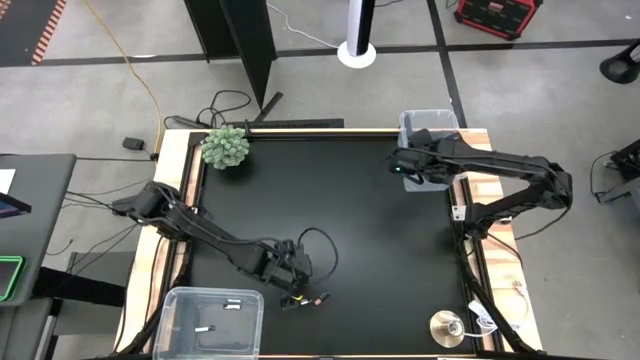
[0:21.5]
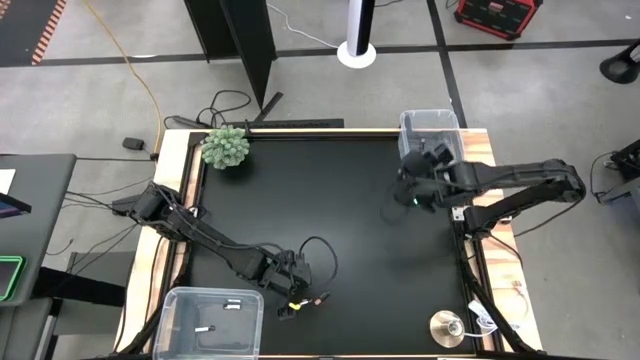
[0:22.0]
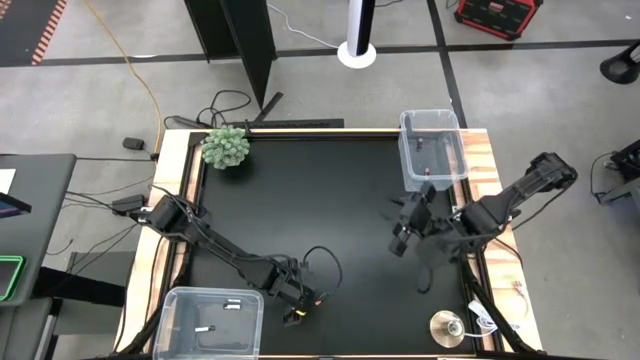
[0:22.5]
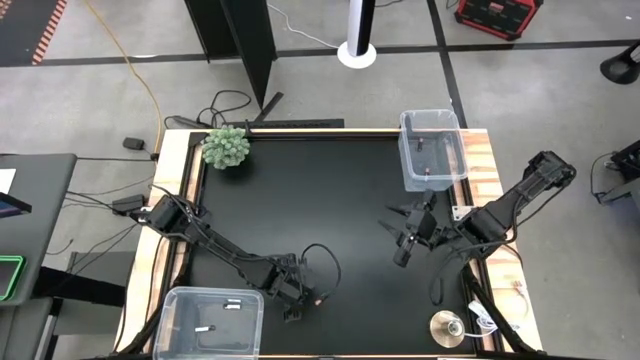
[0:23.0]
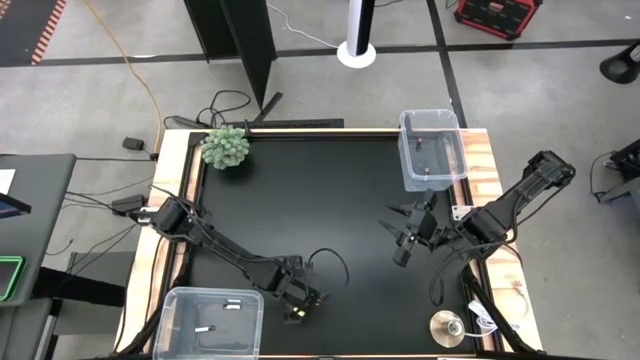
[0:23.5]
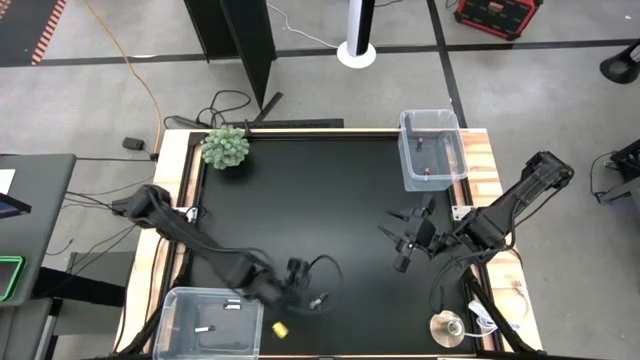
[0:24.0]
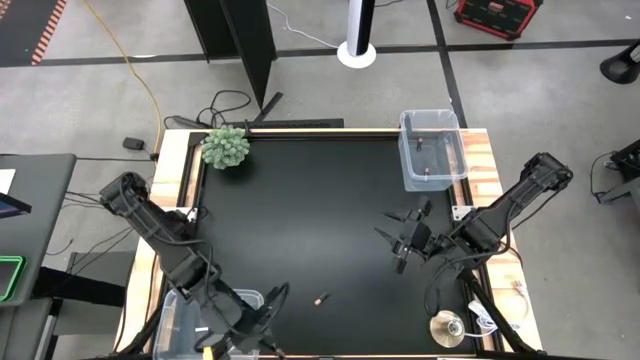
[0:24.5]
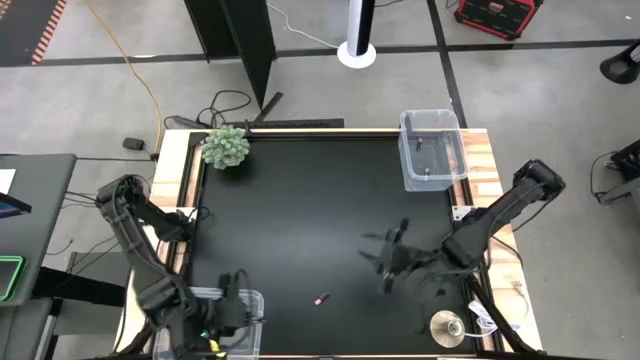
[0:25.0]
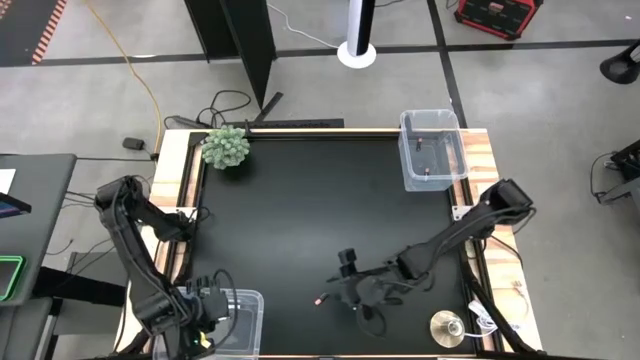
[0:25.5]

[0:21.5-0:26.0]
Task: Sort batteries
Put the silver battery into the bottom transparent bin

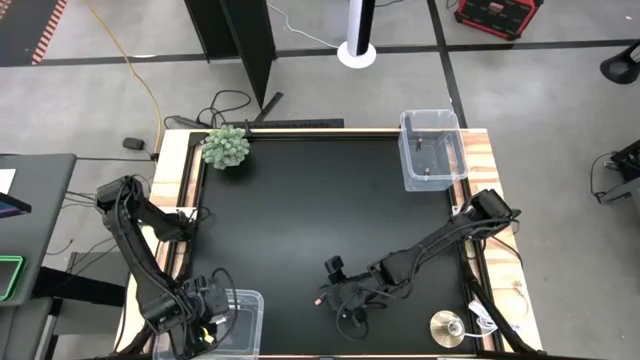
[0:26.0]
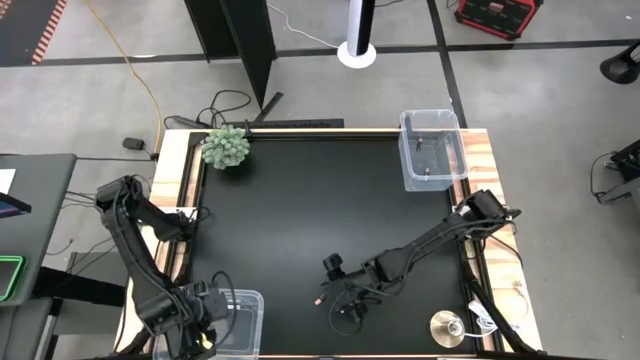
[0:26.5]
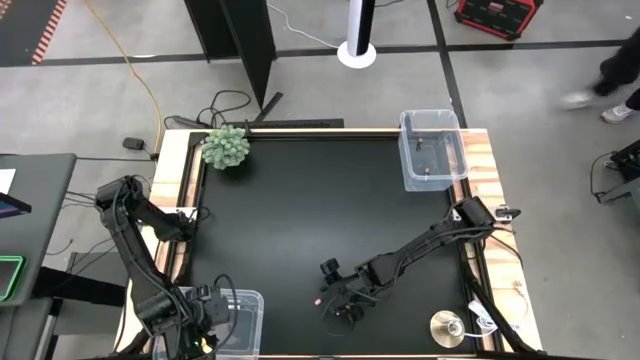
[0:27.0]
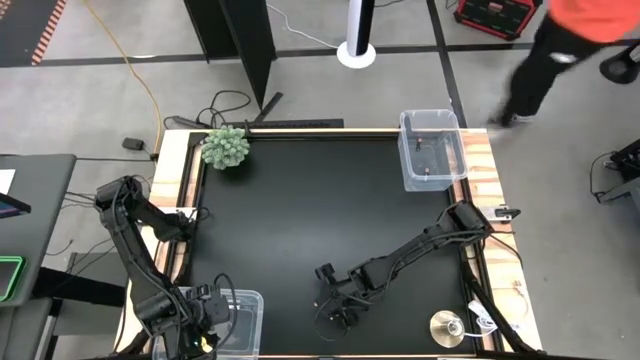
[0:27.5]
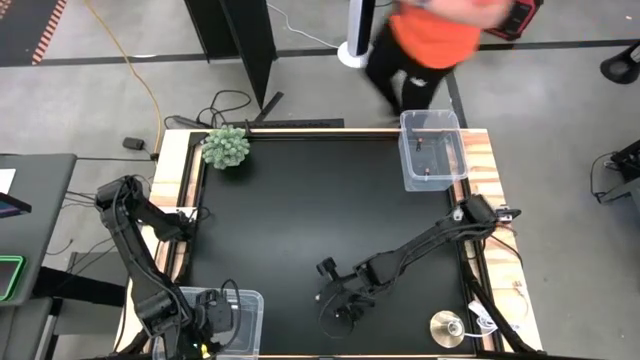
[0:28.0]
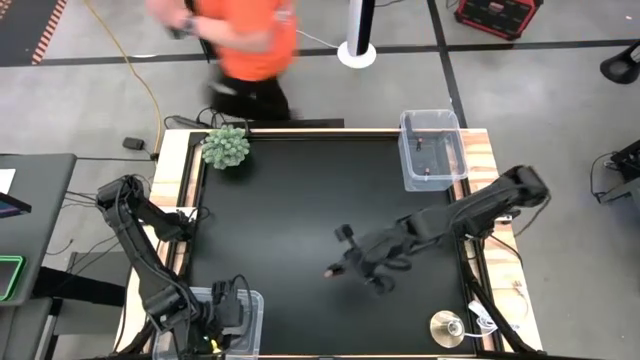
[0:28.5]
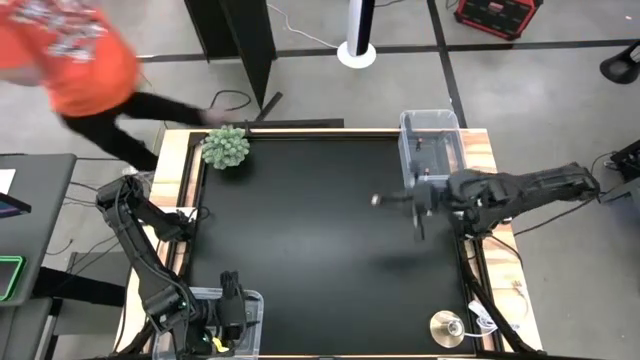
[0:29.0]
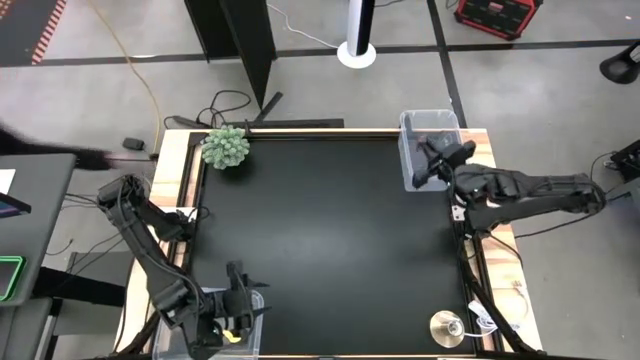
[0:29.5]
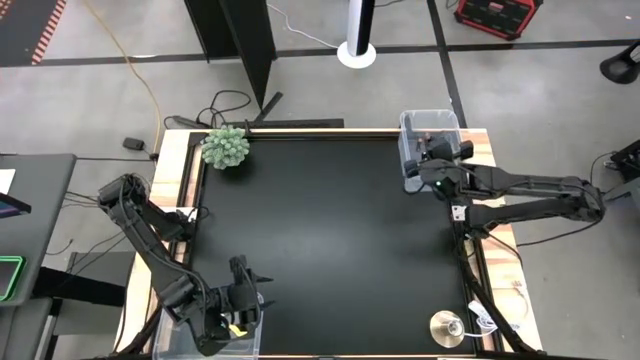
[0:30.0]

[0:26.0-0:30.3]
Put the black battery into the top transparent bin

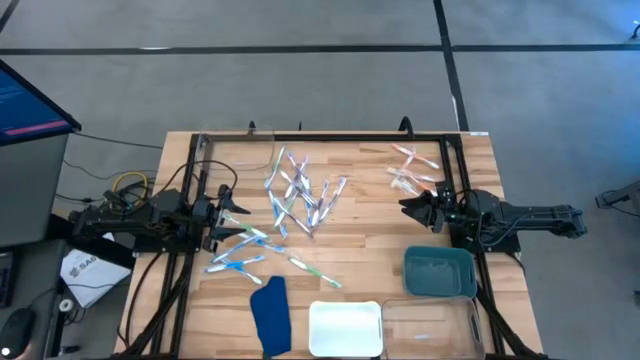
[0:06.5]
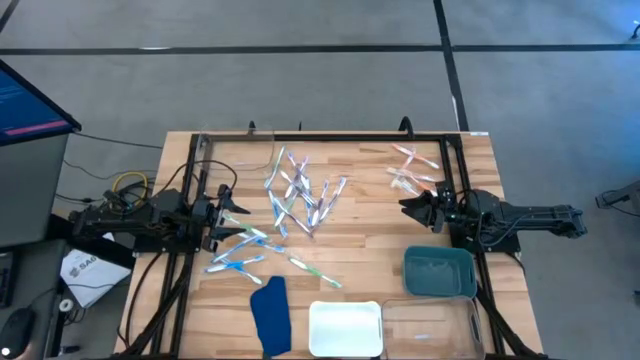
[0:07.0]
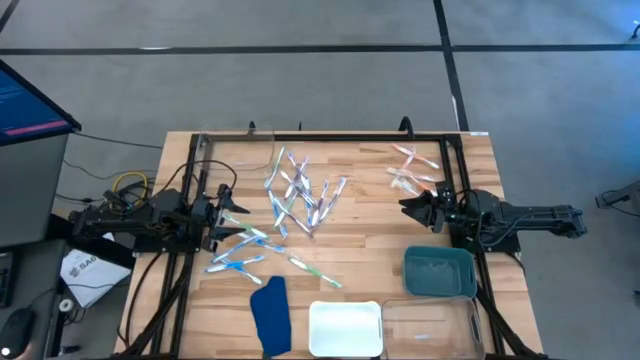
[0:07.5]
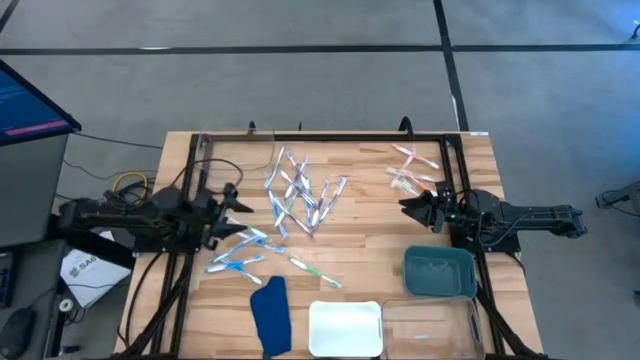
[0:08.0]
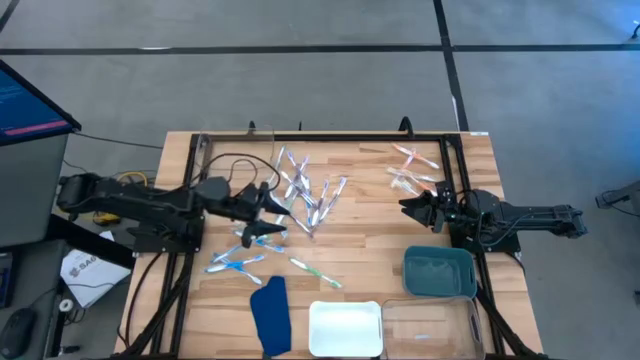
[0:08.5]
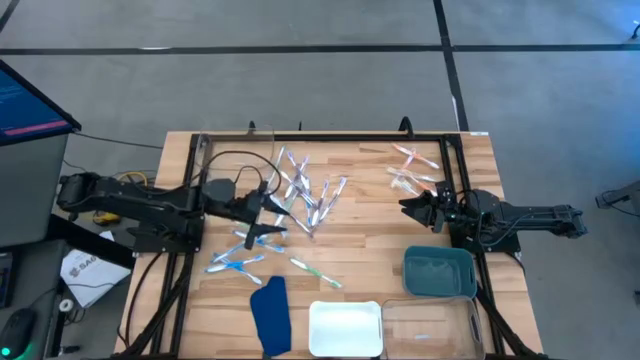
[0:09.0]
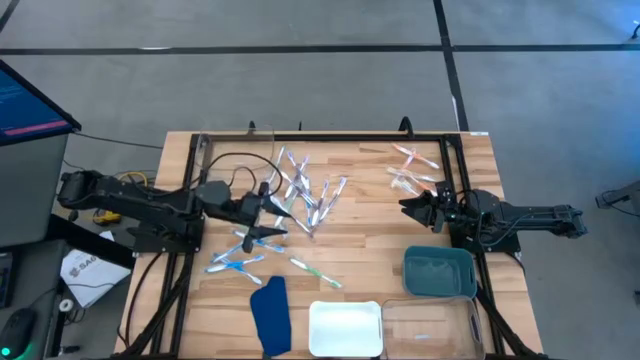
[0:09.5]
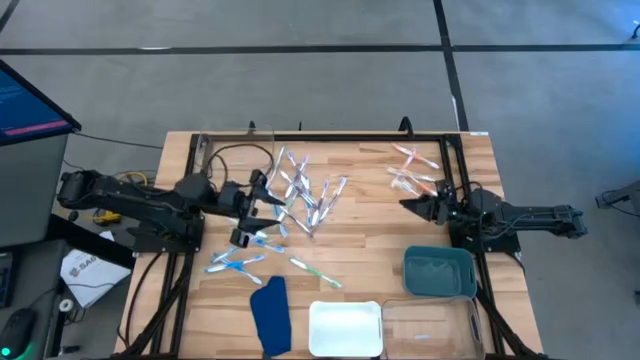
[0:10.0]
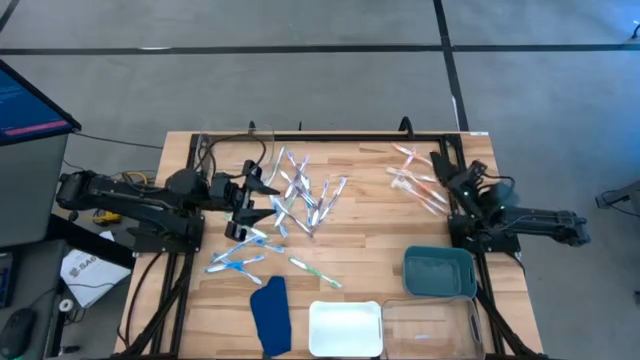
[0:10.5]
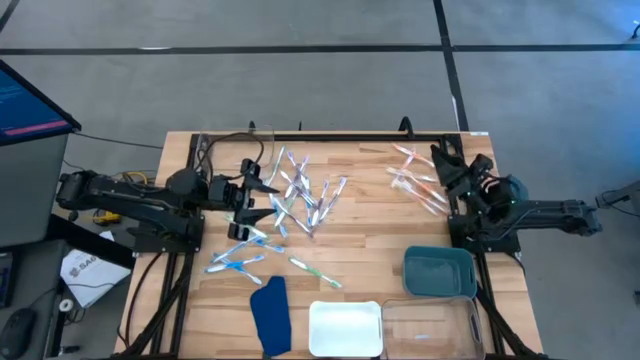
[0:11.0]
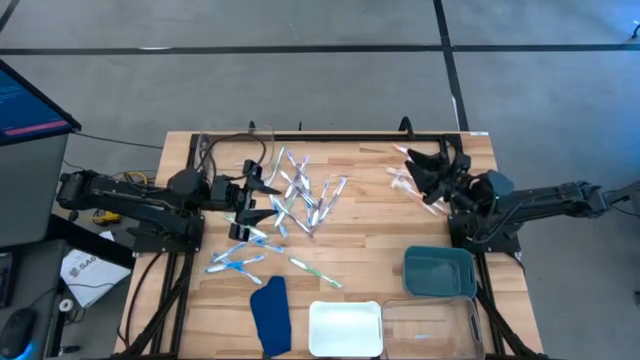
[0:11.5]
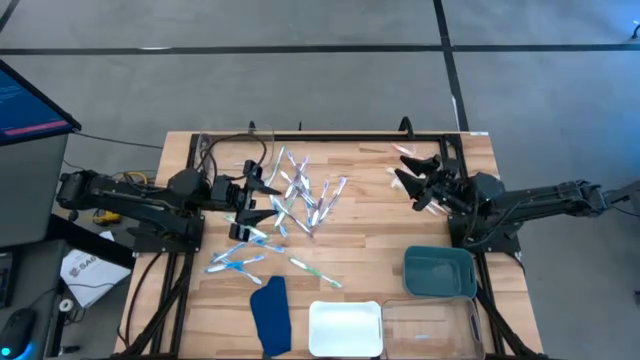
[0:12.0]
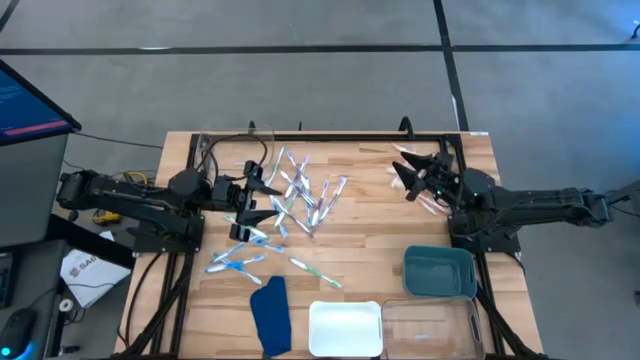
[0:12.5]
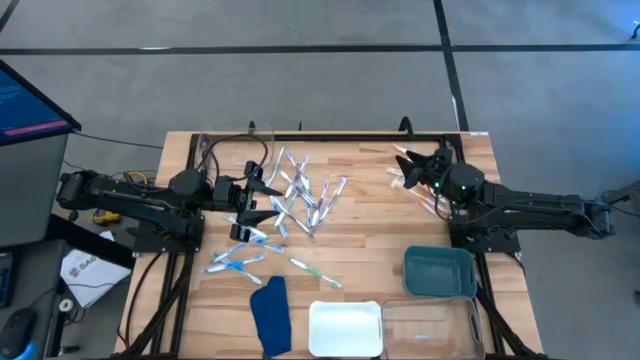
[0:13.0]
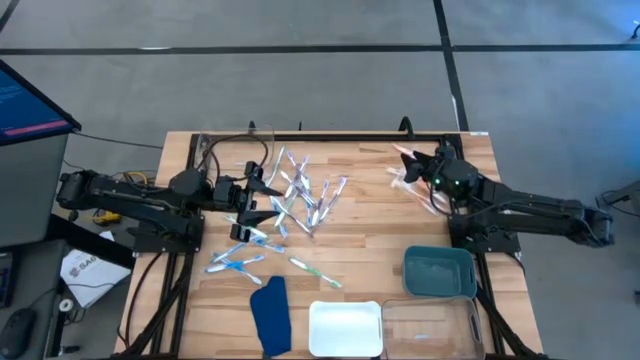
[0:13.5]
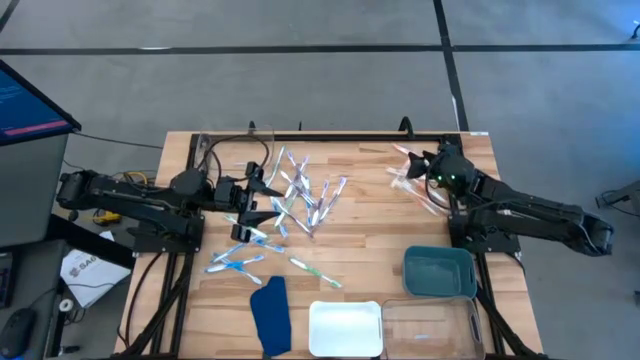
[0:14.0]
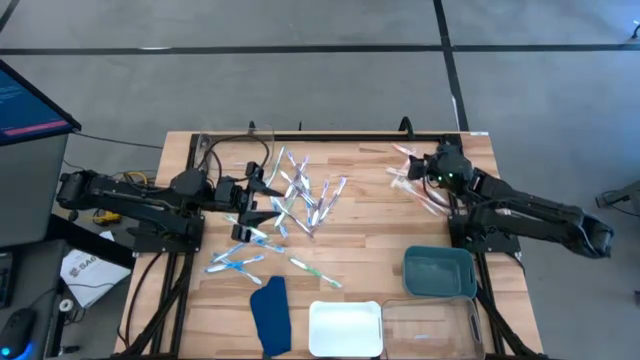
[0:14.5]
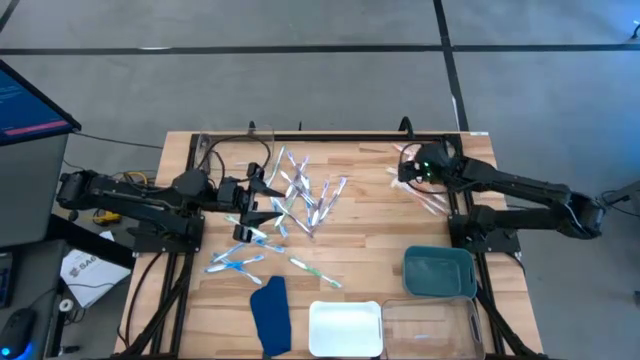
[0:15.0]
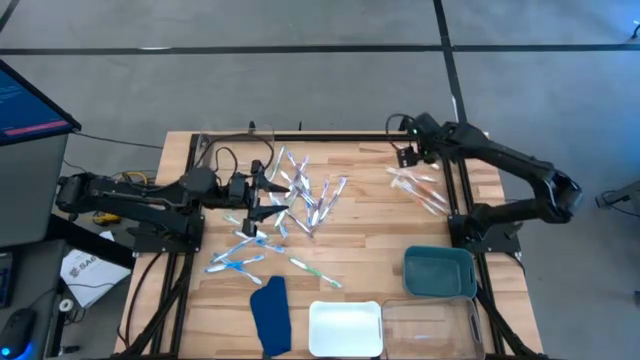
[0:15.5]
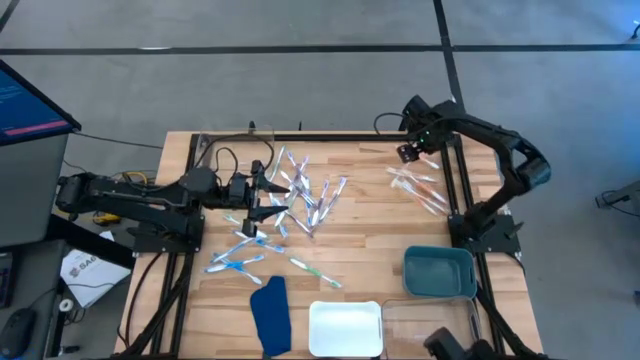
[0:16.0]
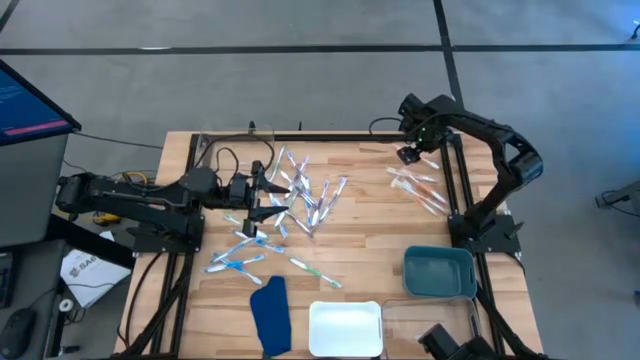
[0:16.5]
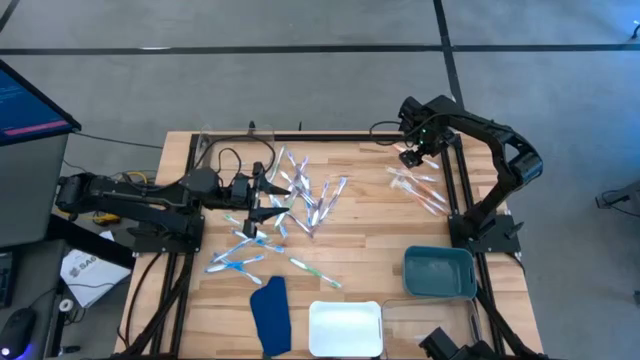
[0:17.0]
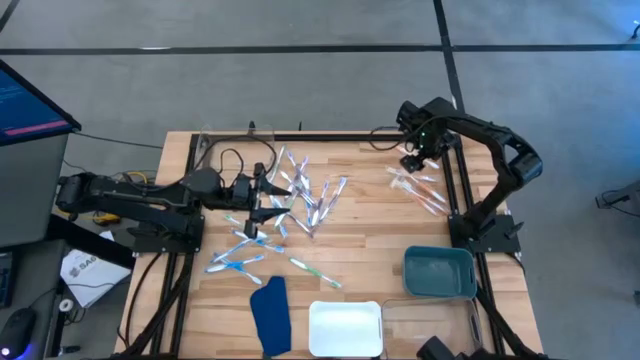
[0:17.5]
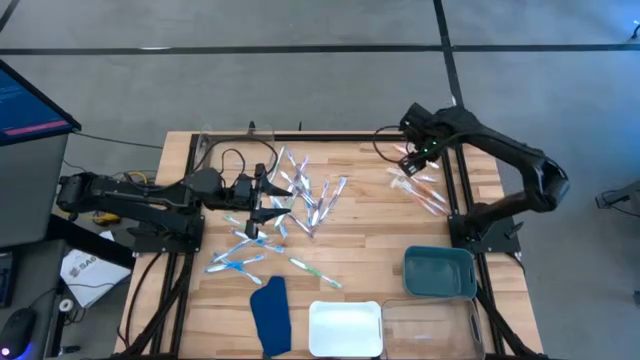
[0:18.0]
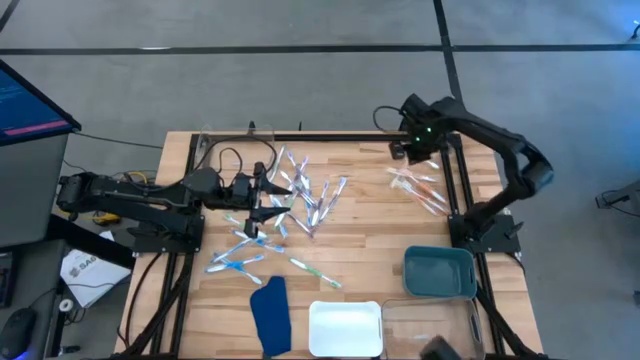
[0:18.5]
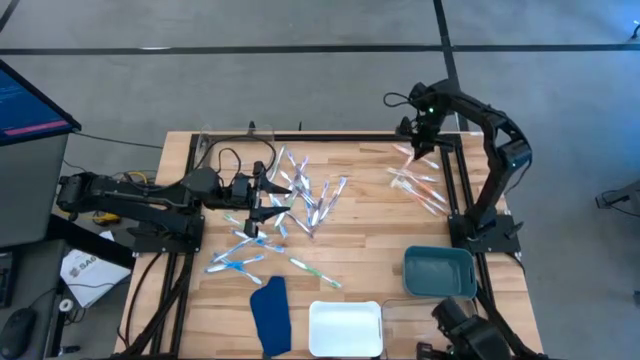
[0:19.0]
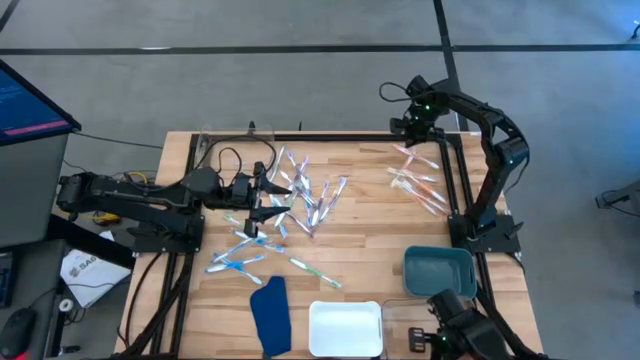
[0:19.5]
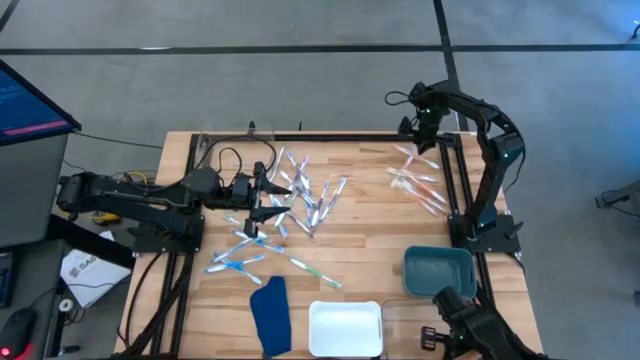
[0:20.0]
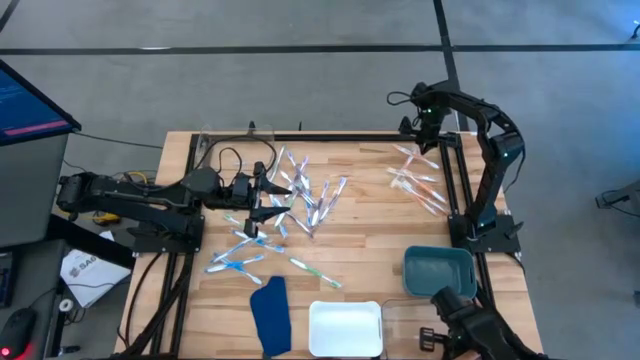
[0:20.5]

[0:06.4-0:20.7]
Task: Pick & Place Toothbrushes
Adjust the orange toothbrushes
